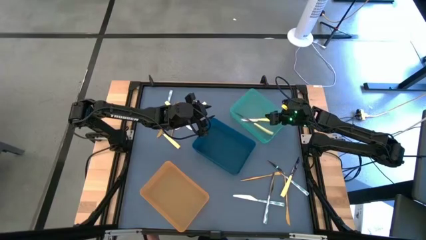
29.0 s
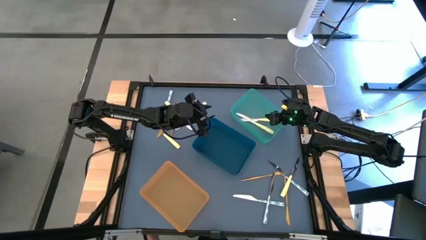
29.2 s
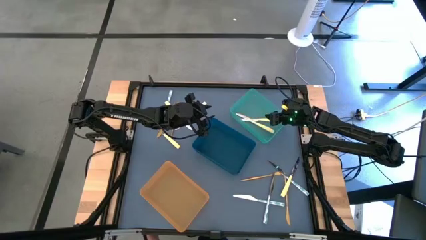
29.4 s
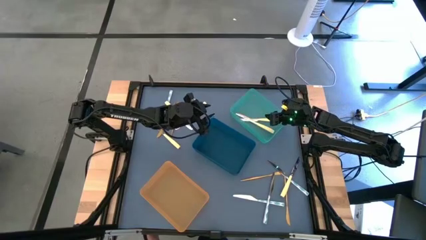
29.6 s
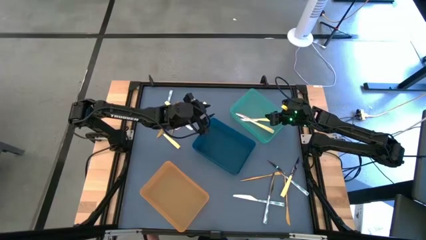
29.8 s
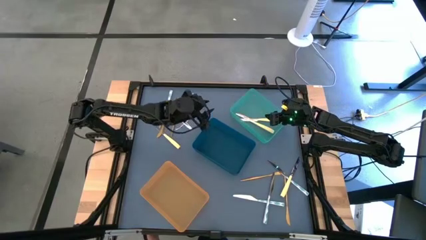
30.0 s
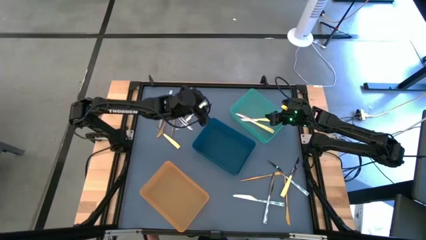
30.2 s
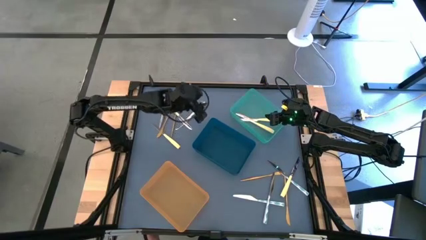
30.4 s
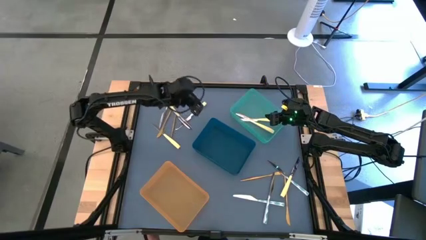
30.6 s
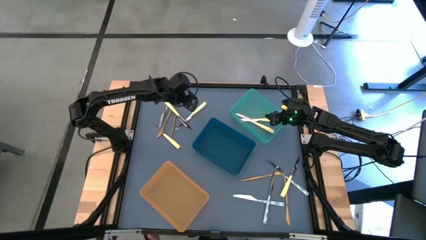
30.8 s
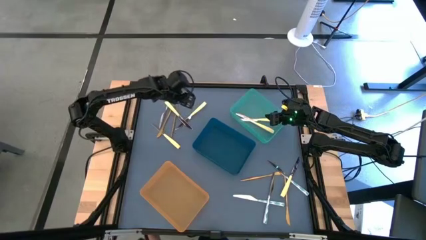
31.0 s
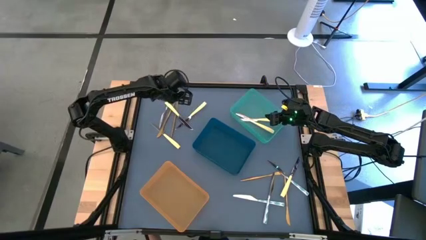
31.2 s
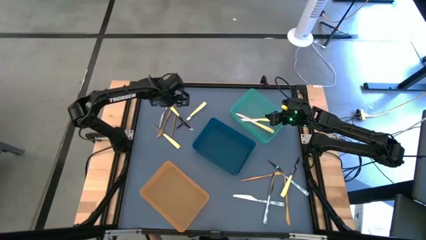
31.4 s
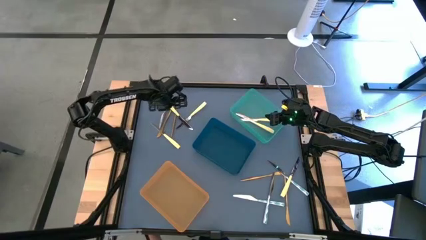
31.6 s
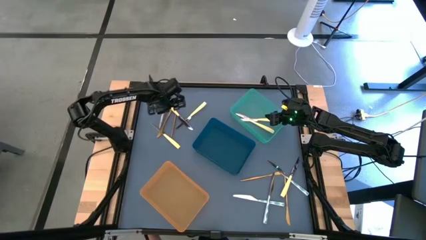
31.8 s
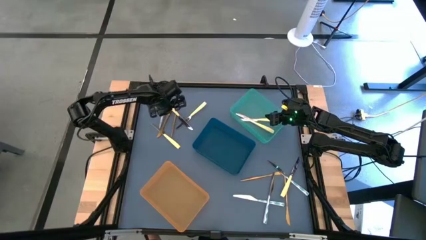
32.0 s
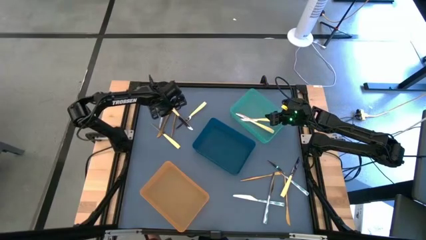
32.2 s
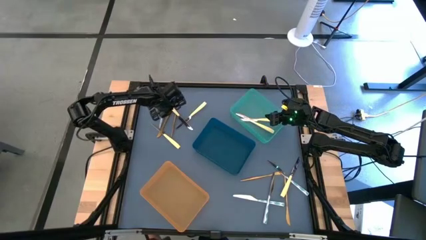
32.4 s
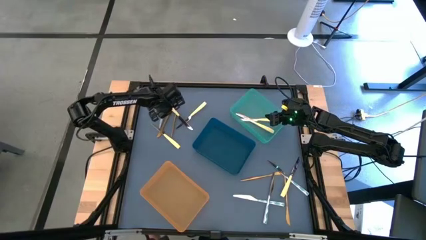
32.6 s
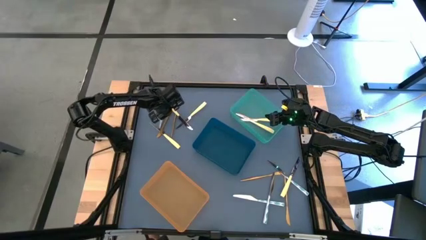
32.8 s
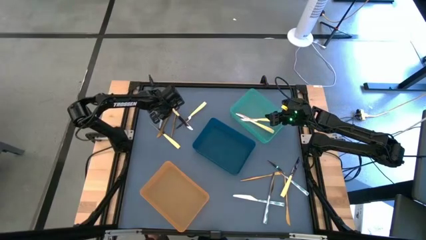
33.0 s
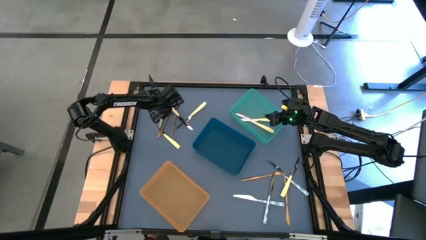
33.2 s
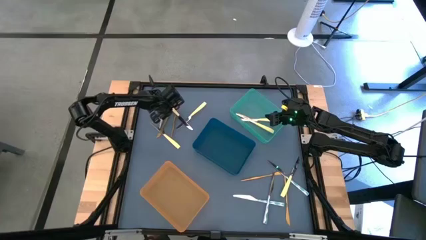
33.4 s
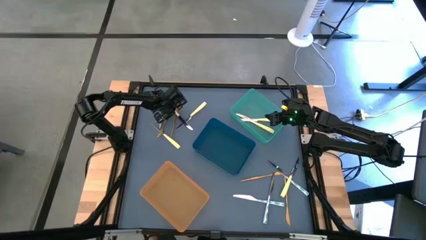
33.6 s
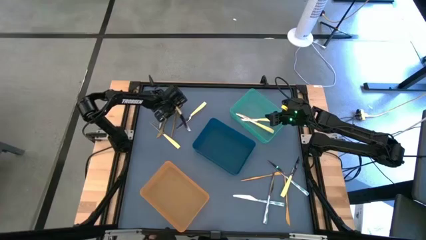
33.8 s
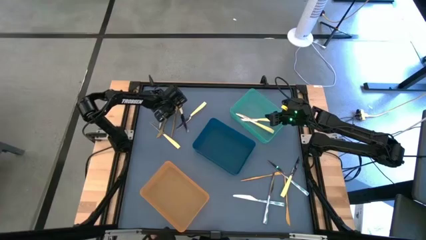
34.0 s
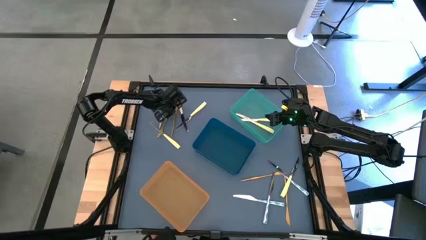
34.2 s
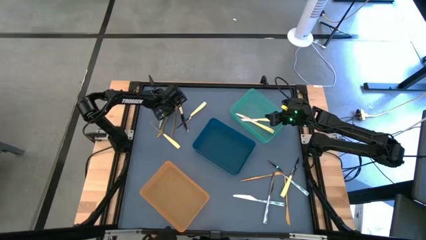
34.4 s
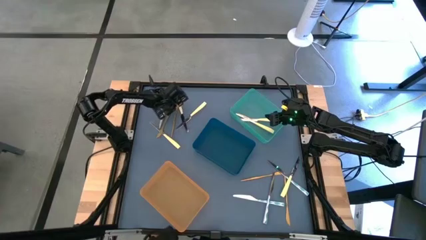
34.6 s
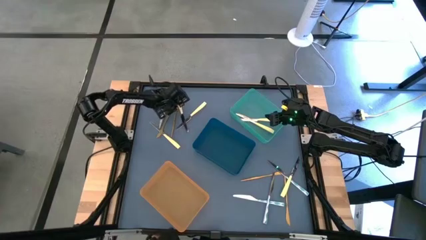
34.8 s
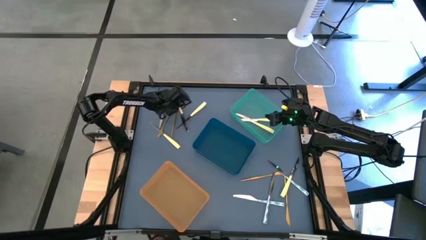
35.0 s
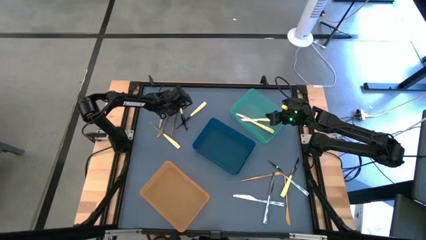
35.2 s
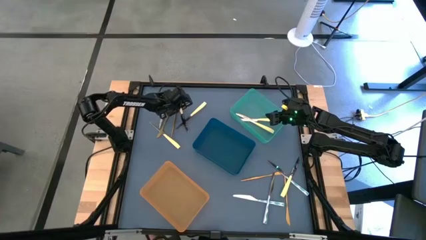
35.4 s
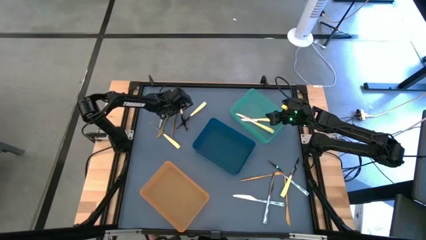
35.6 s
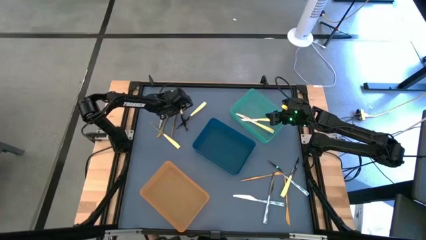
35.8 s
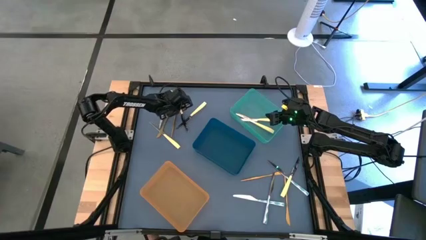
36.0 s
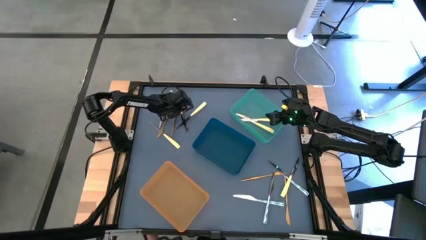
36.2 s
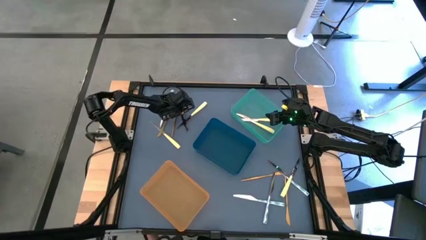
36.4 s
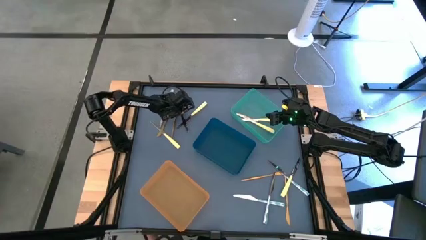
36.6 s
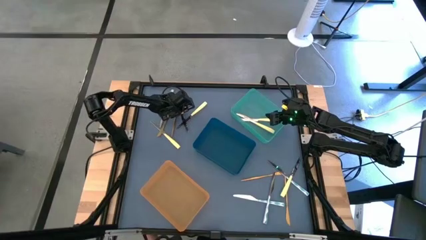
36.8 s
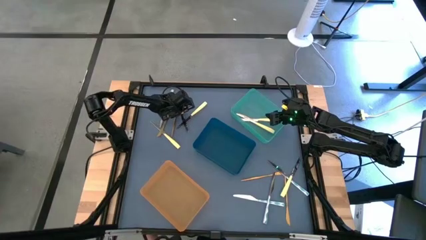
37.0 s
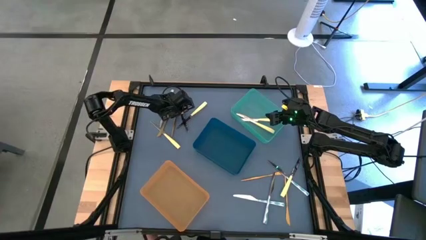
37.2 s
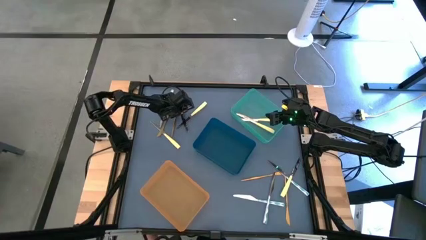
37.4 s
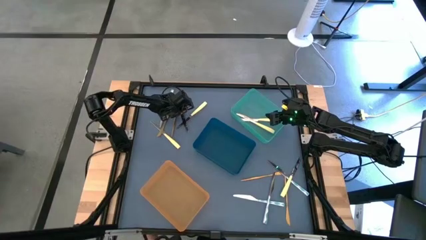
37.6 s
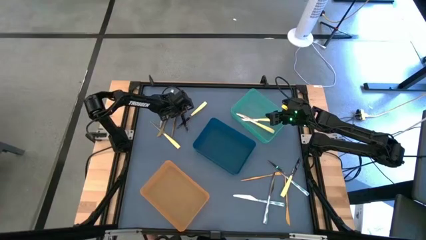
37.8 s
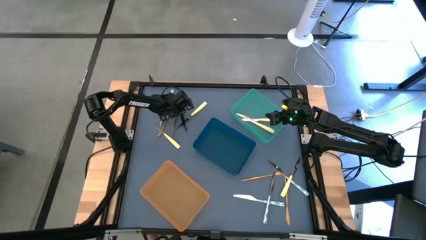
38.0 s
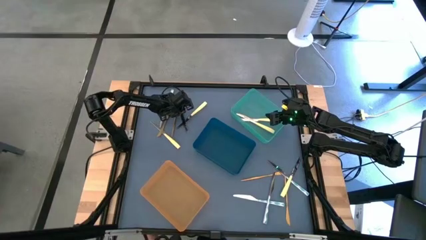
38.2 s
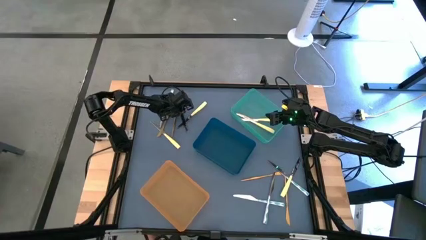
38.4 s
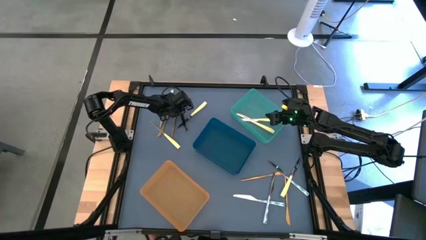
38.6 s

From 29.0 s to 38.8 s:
Task: Sort silverware by color (type)
Put the right yellow knife into the light blue bin

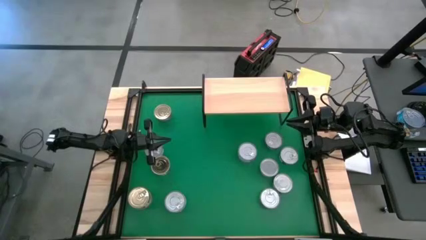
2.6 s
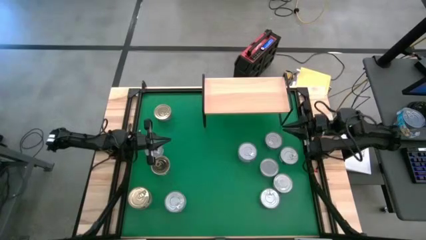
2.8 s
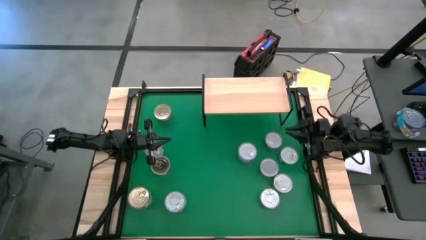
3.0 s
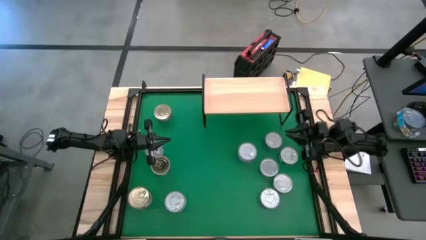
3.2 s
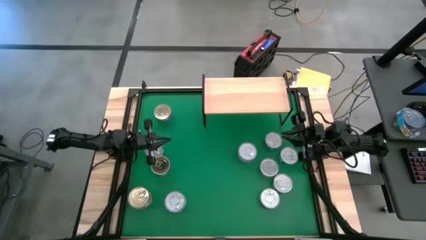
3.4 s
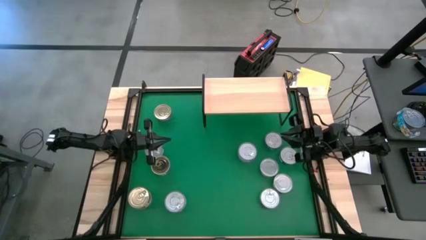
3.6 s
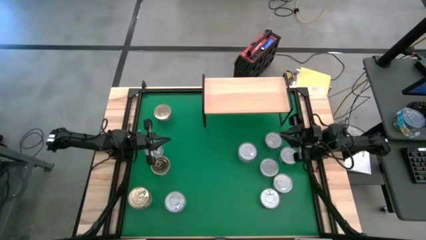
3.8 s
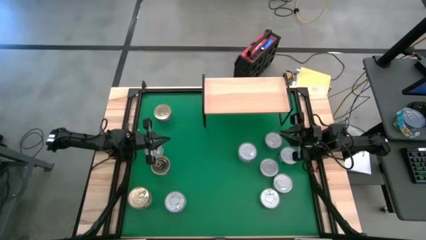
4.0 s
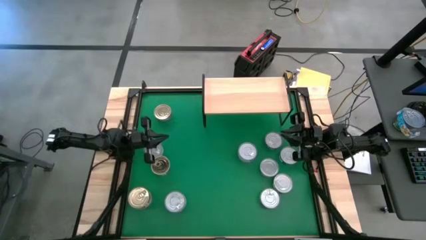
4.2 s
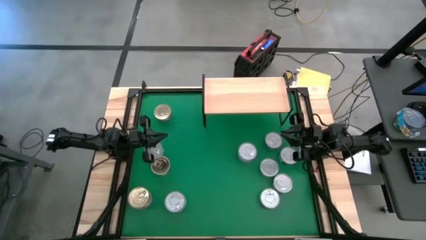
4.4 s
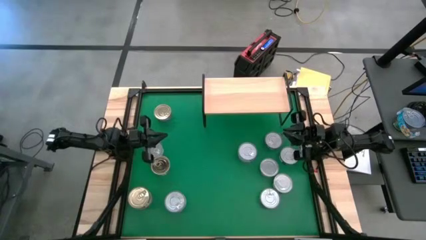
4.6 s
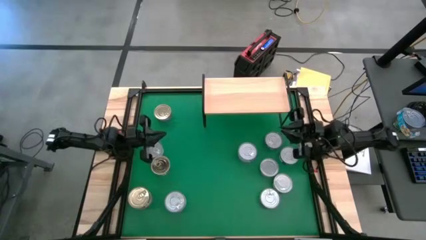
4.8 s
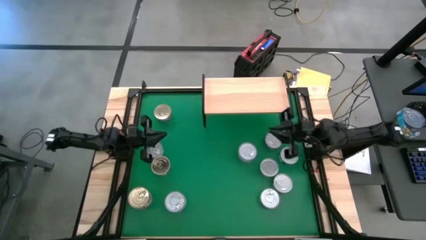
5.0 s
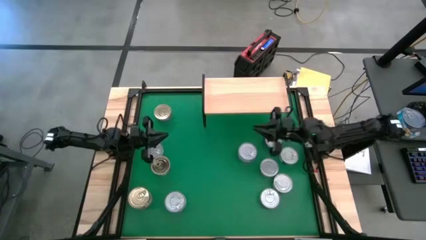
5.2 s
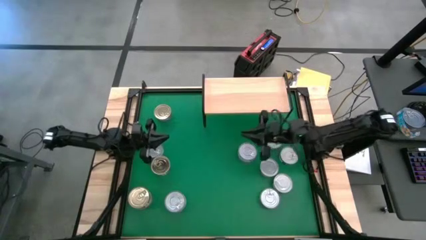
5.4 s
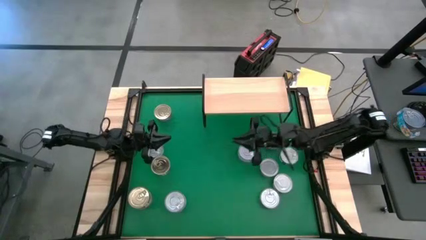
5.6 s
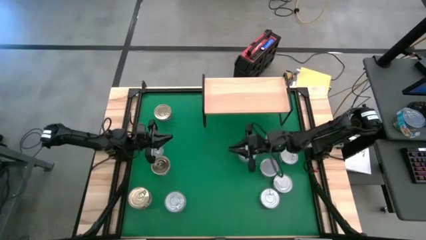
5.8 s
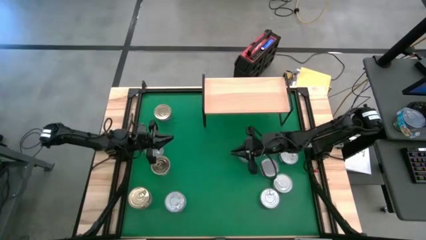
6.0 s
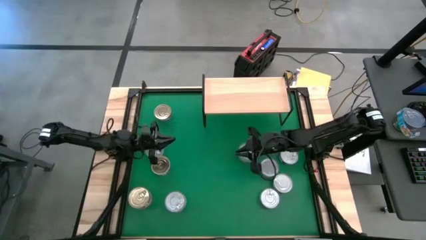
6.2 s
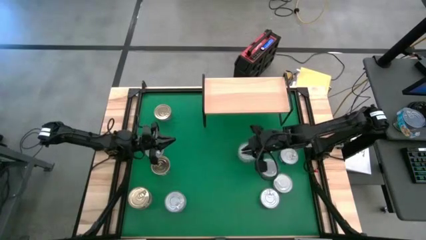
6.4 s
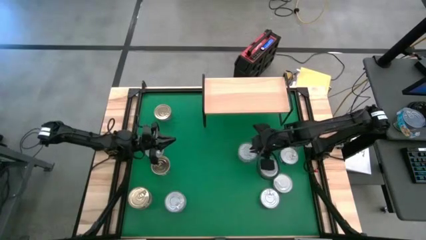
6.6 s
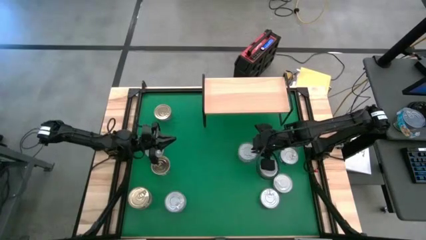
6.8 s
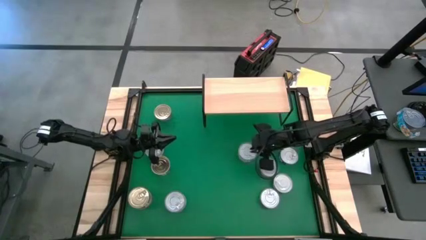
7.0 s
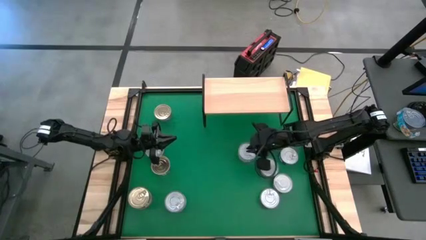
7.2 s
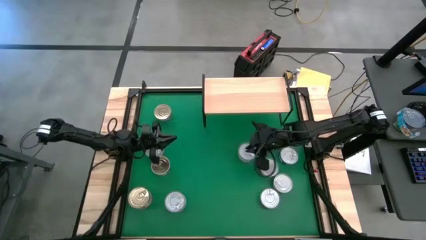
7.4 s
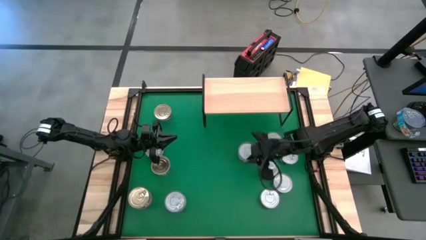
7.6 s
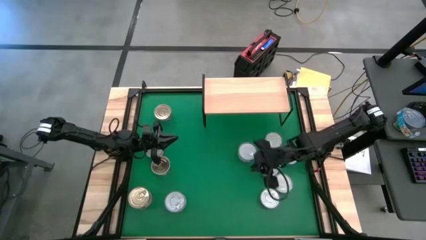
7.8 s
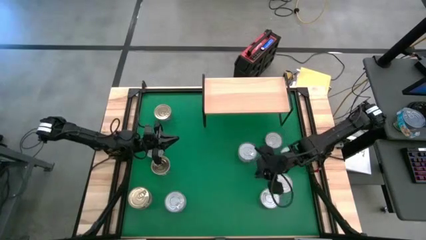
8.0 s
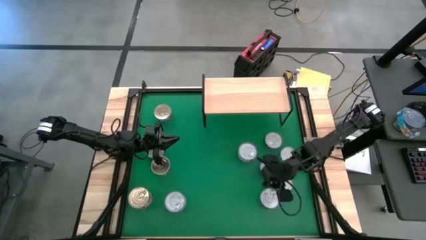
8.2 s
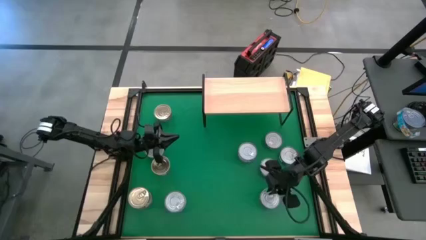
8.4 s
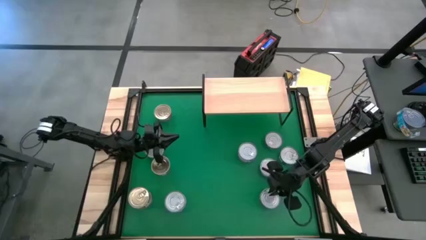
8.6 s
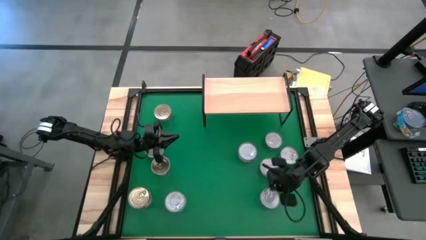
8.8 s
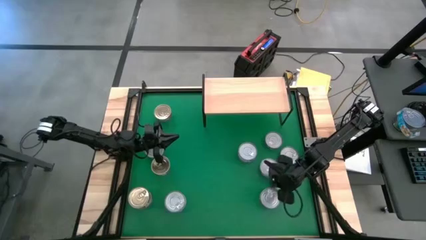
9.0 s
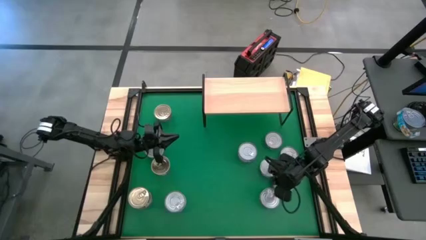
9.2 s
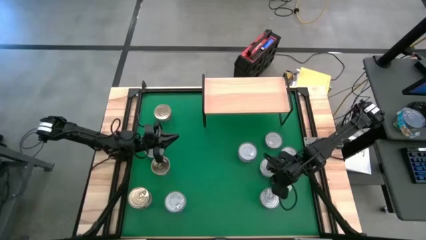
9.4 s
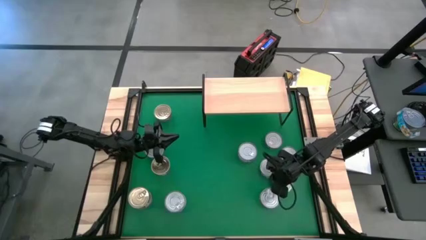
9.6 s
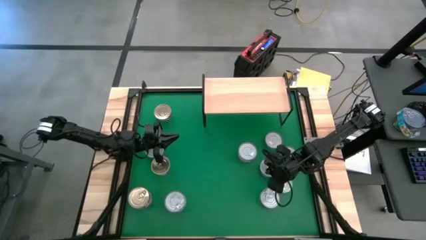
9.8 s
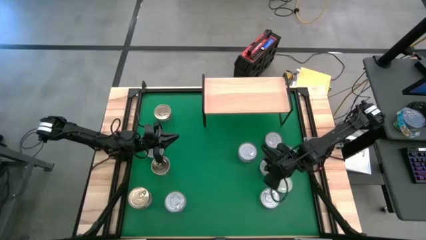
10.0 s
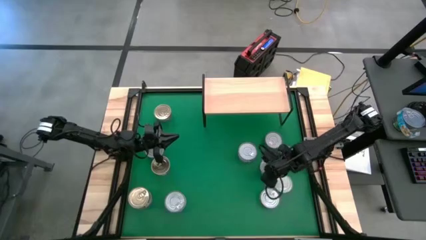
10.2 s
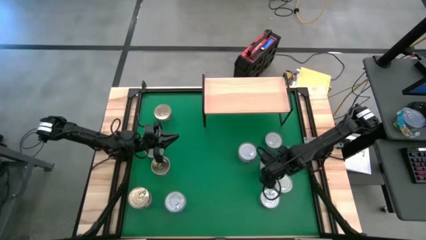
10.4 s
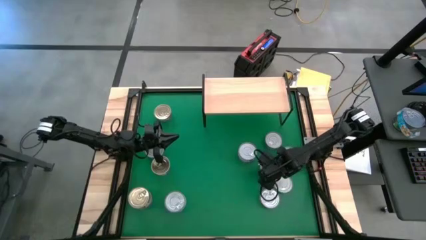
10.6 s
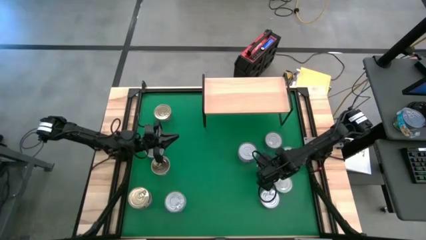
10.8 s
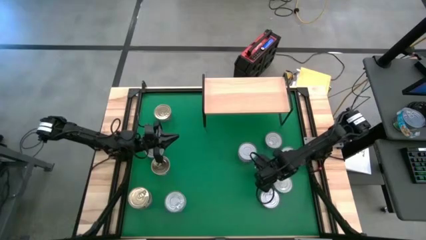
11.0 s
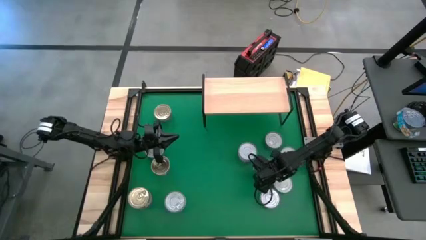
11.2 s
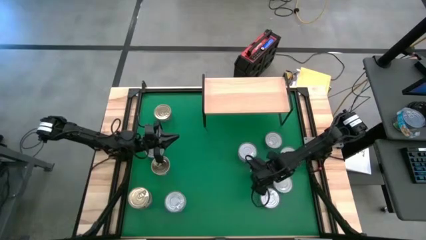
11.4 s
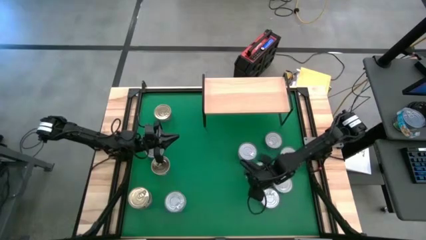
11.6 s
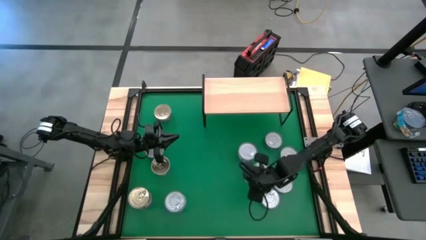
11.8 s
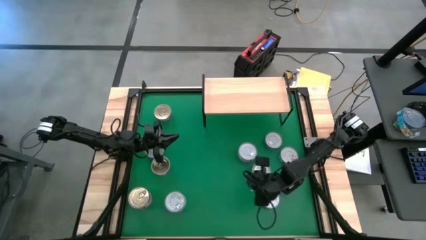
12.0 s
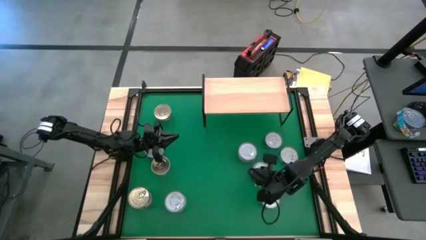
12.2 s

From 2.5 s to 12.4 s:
Task: Stack canned seafood by type on shelf
Put the green tuna can on the shelf
